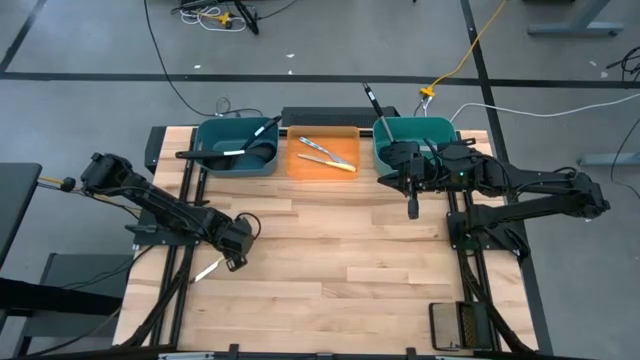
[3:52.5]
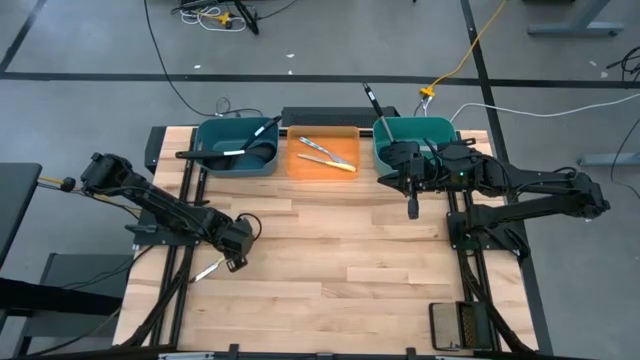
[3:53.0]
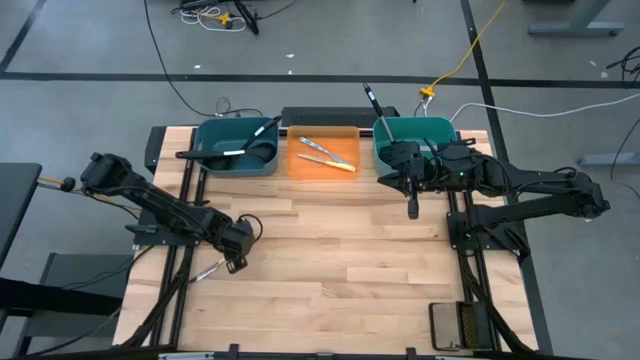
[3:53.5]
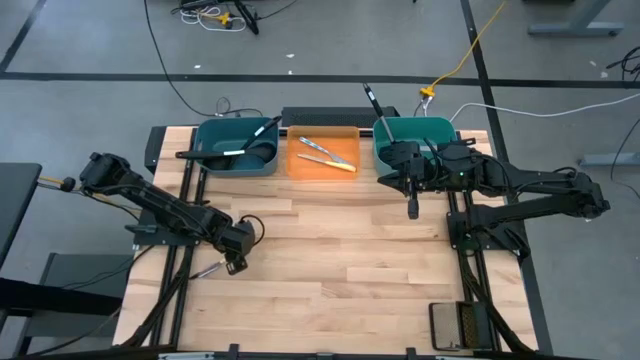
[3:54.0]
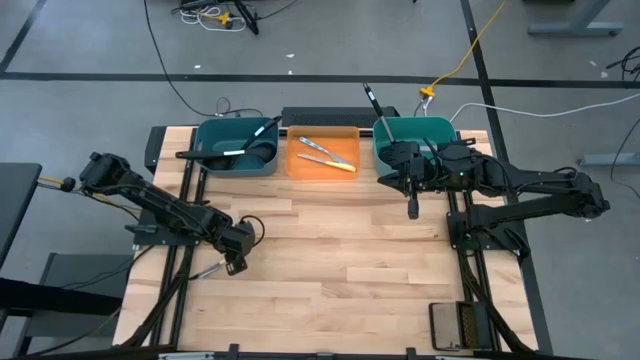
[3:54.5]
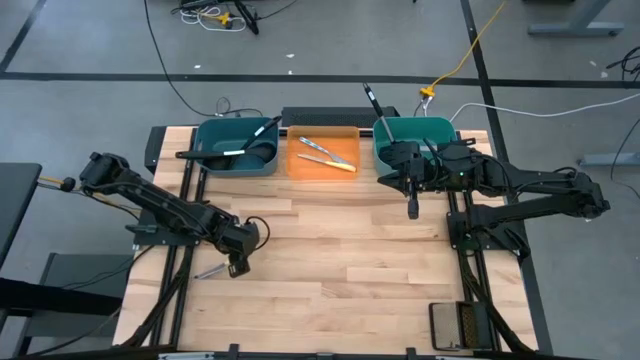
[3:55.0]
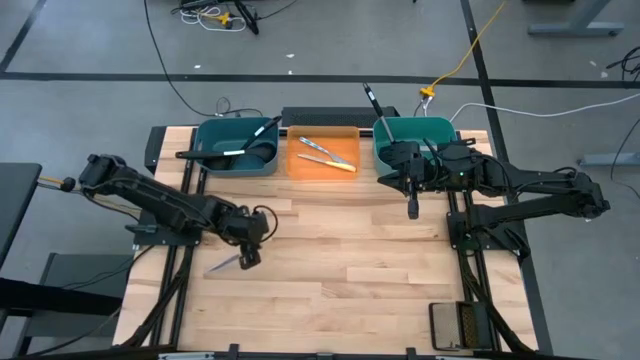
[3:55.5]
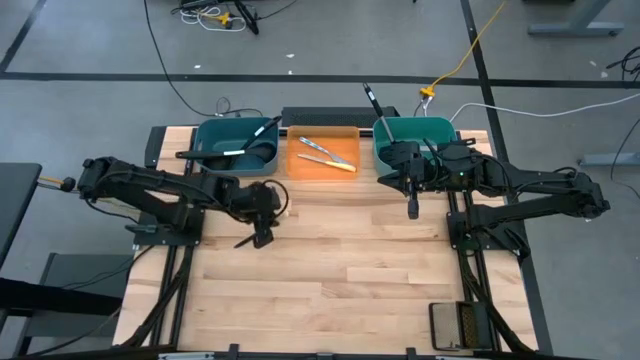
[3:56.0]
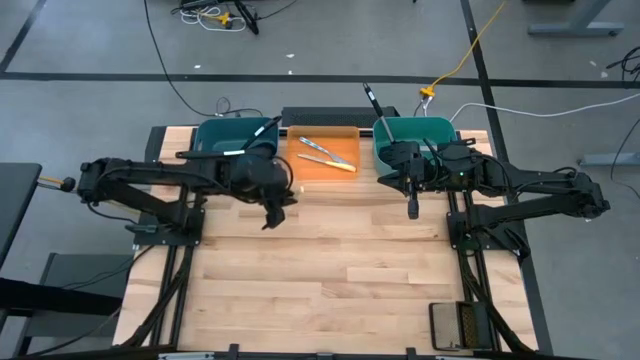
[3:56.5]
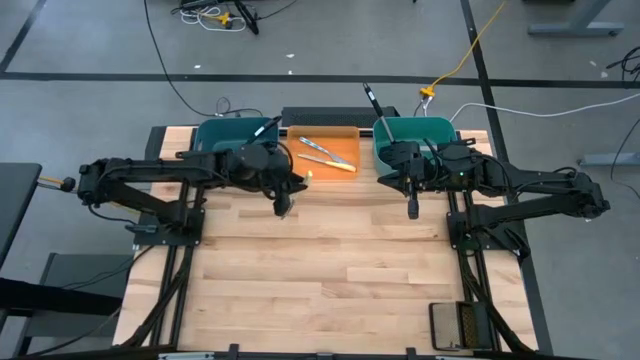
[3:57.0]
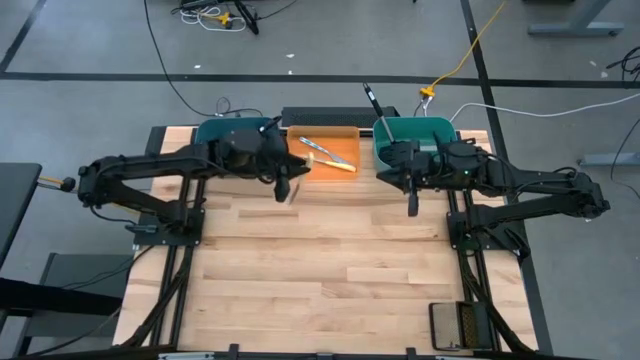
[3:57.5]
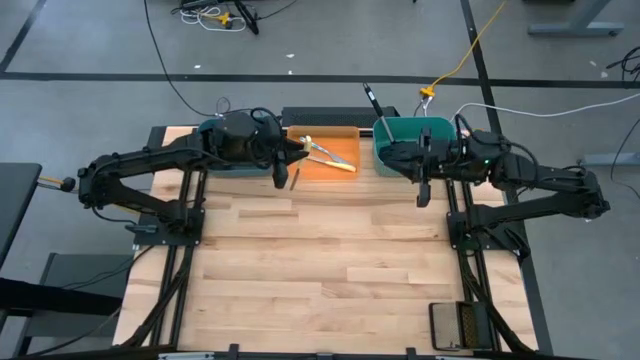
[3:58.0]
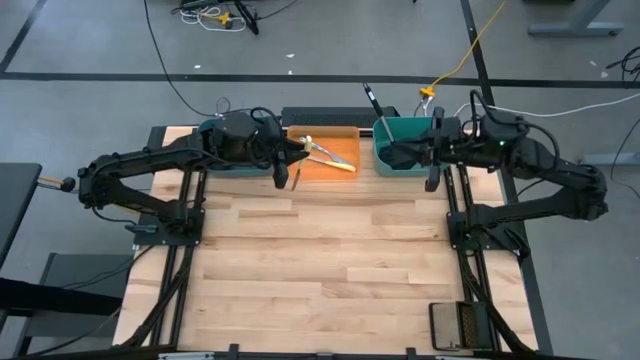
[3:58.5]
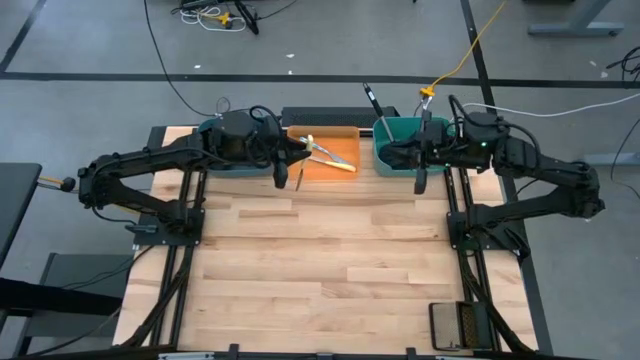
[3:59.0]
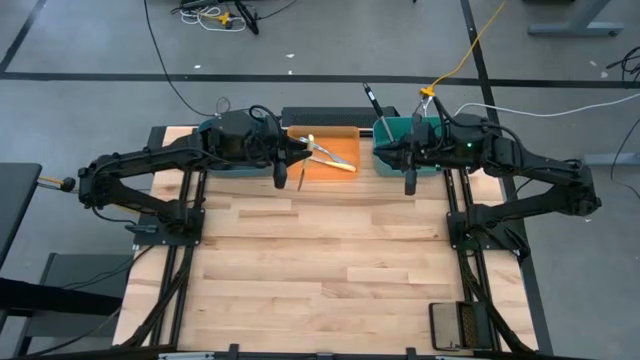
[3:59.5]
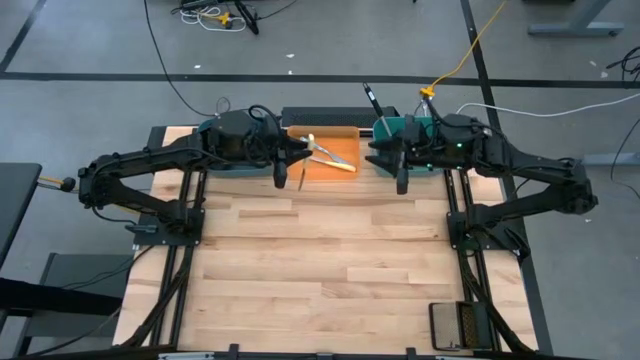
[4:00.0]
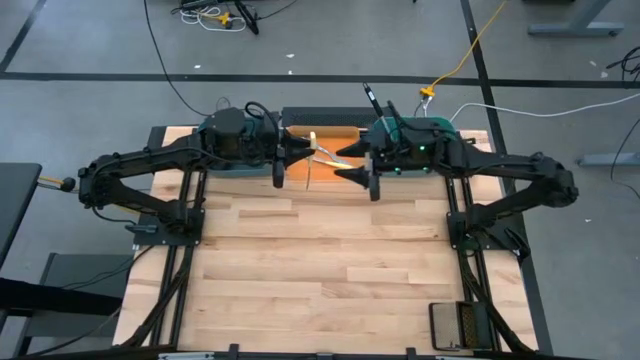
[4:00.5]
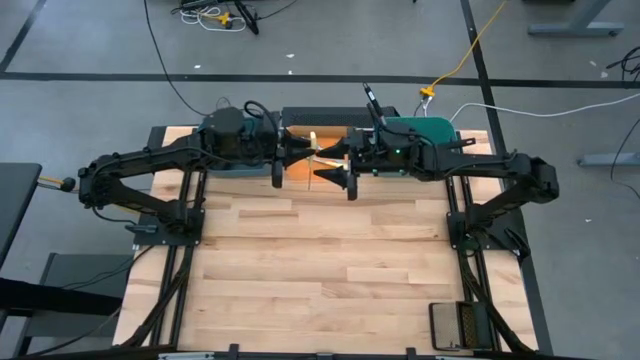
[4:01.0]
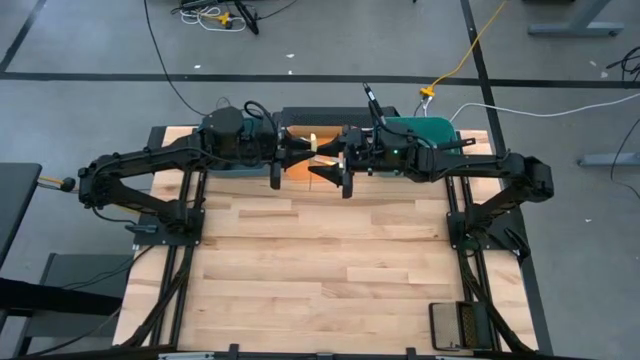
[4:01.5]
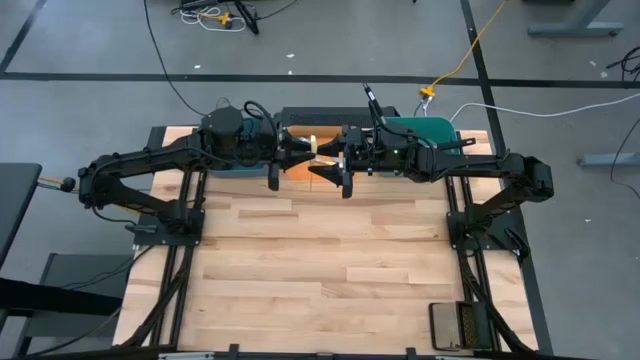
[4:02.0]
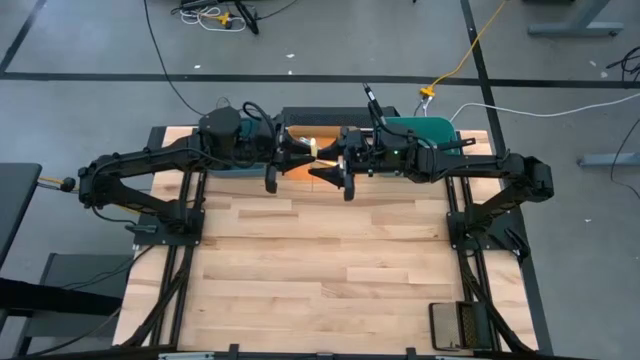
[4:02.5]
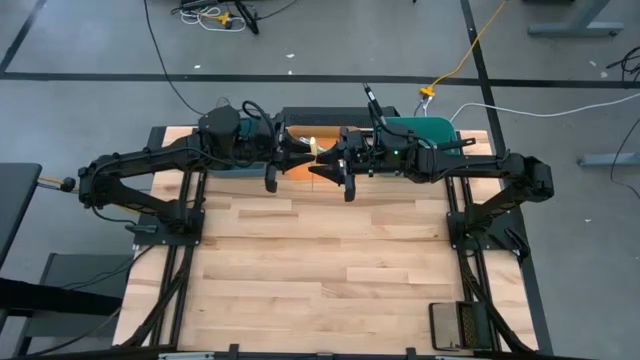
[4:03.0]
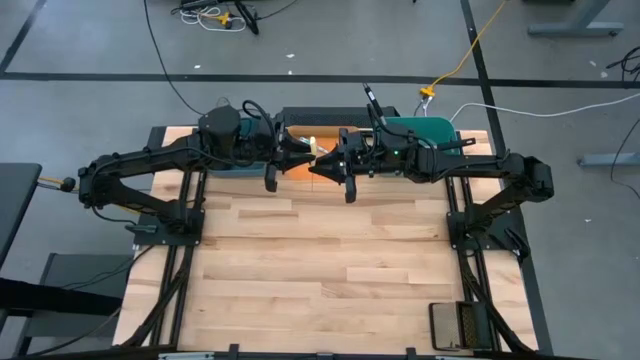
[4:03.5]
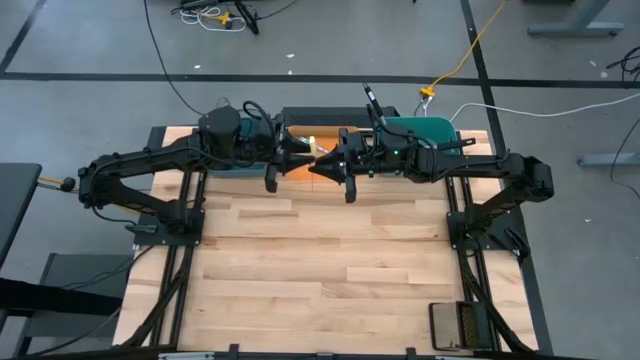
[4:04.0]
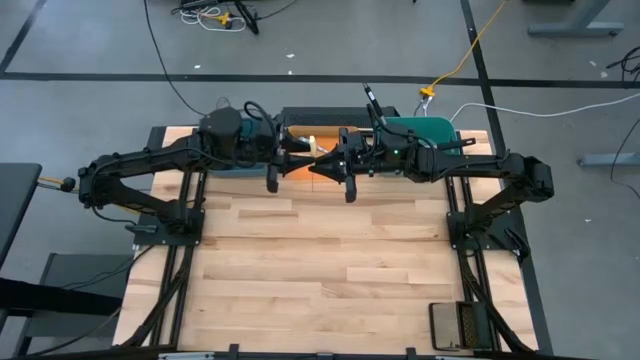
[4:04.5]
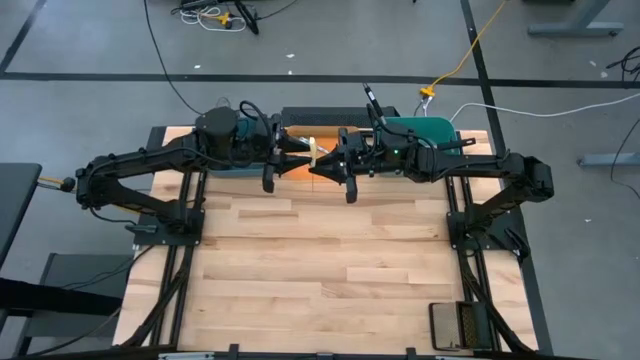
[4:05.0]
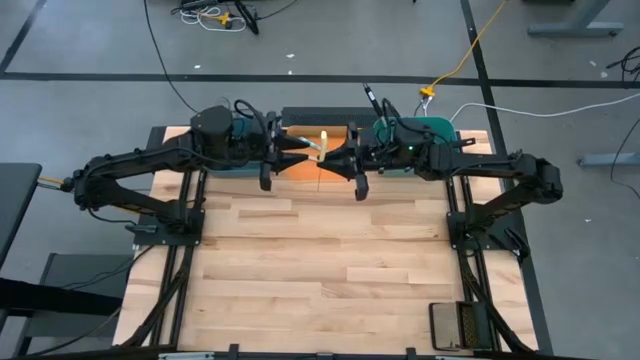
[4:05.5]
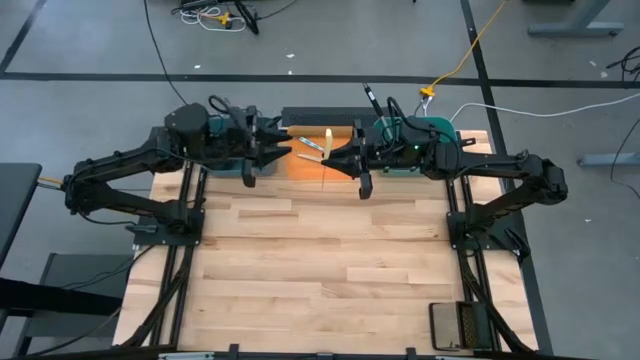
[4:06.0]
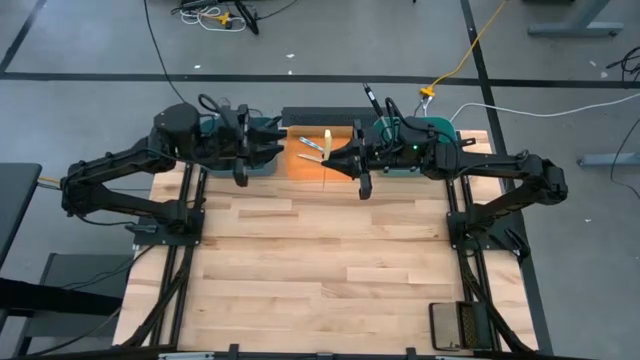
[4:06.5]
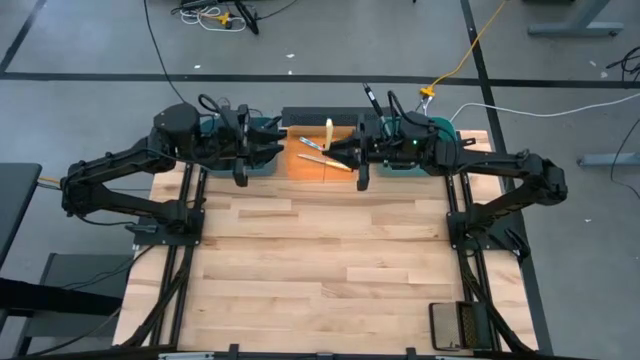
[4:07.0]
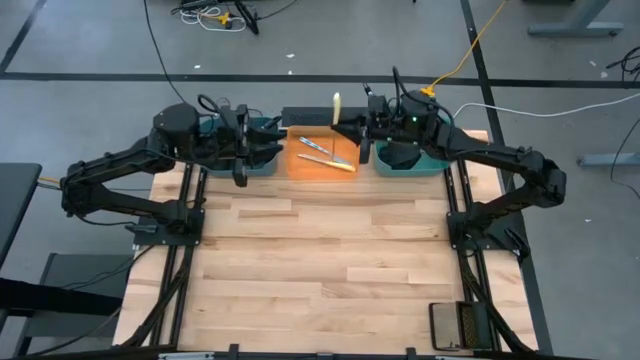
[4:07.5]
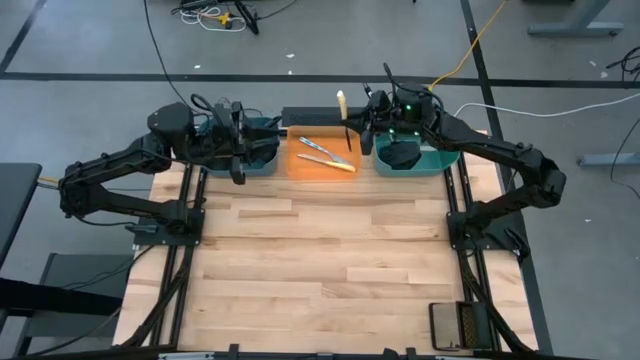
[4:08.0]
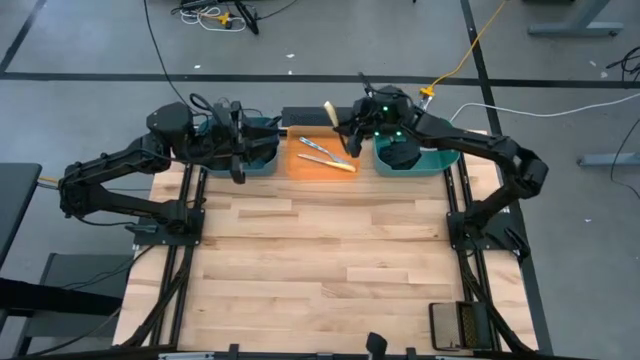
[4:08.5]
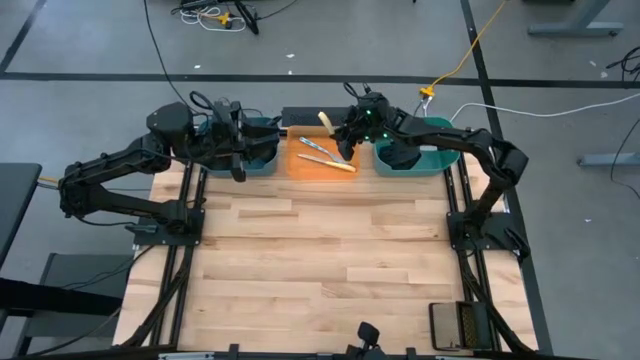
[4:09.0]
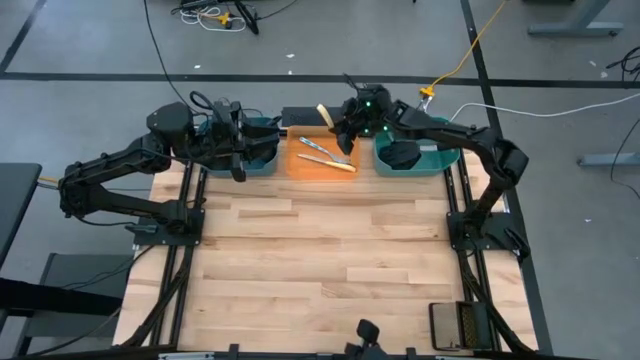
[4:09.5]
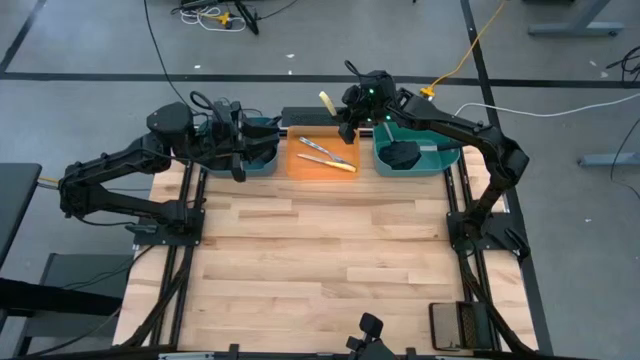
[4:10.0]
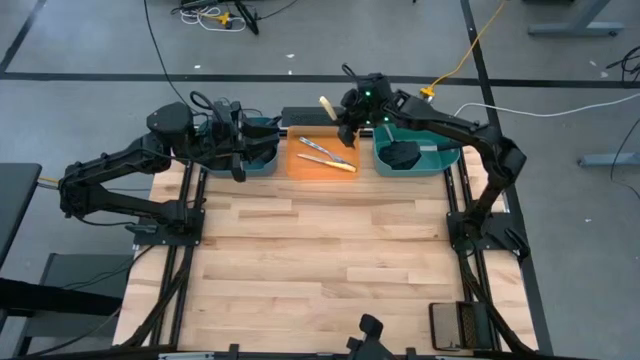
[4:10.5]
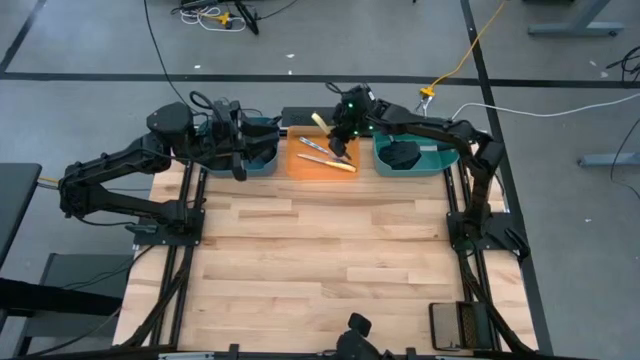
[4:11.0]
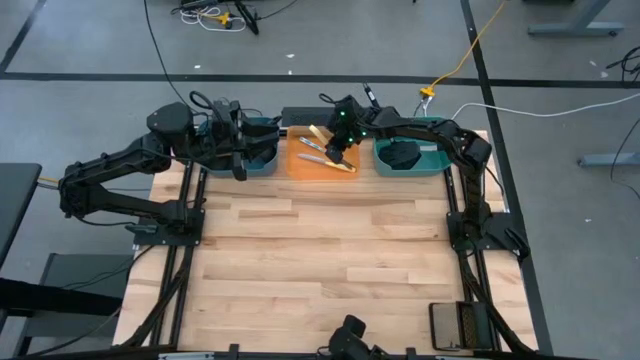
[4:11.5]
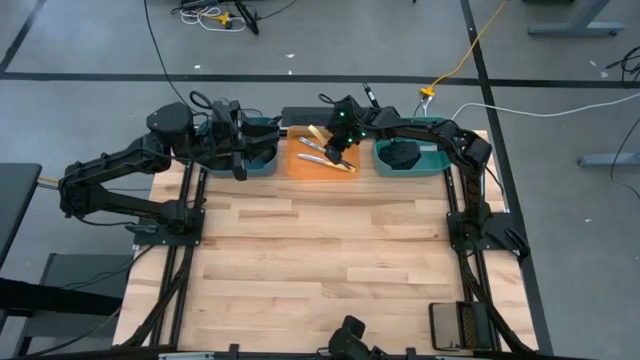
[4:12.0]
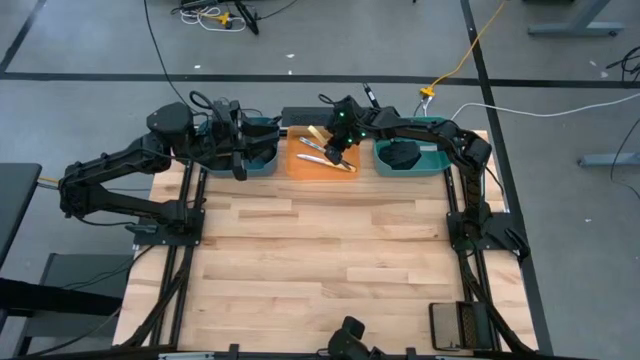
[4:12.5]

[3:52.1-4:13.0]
Task: Pick & Place Kitchen Items
Put the yellow knife into the orange bin
